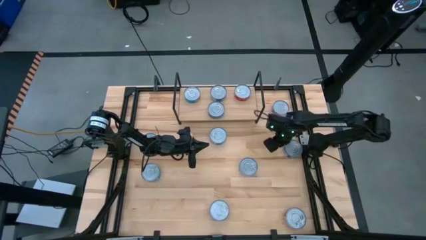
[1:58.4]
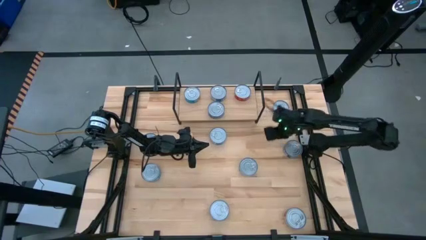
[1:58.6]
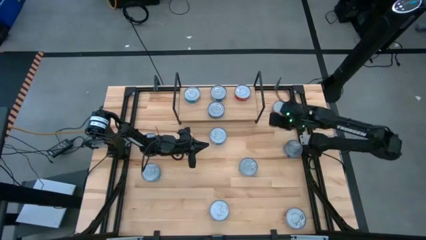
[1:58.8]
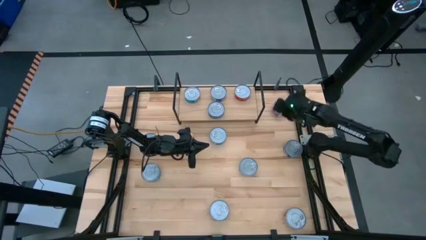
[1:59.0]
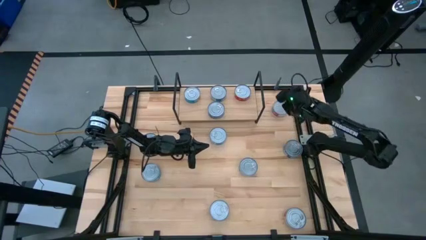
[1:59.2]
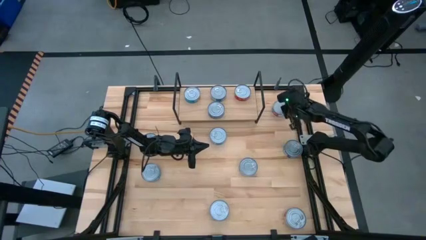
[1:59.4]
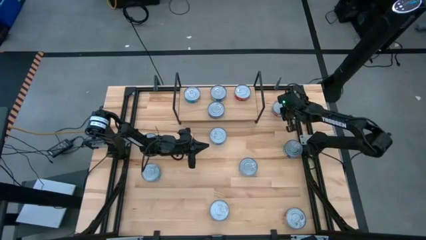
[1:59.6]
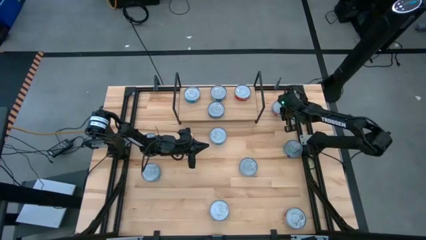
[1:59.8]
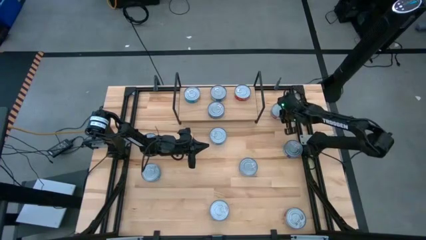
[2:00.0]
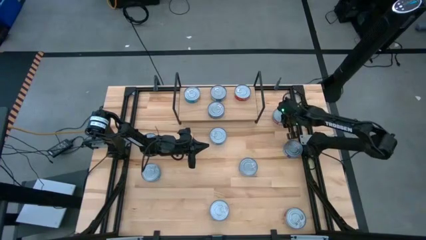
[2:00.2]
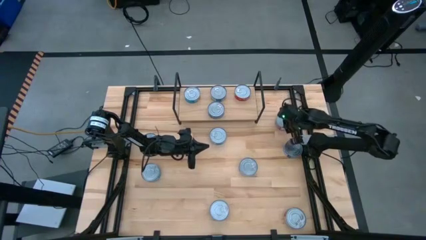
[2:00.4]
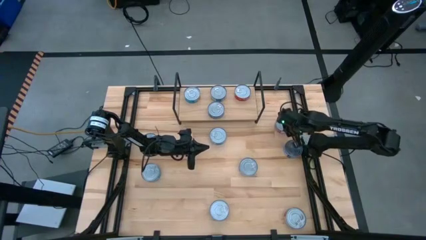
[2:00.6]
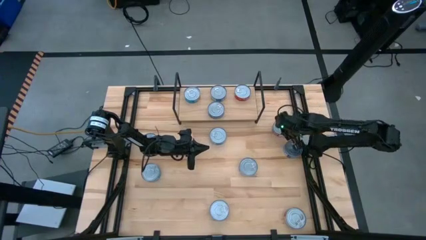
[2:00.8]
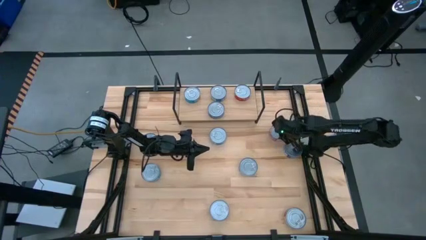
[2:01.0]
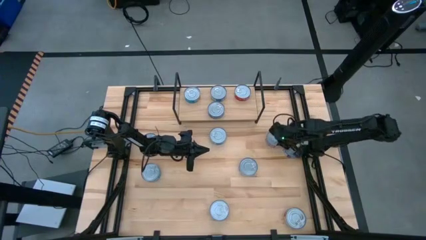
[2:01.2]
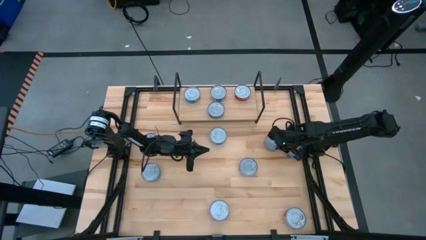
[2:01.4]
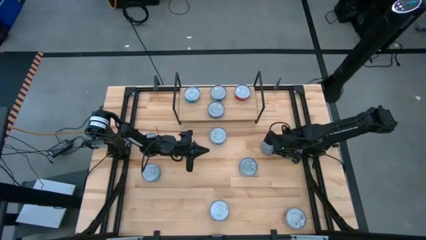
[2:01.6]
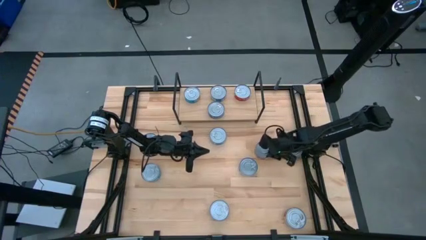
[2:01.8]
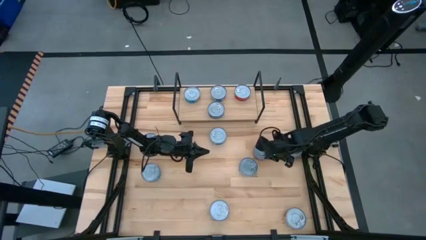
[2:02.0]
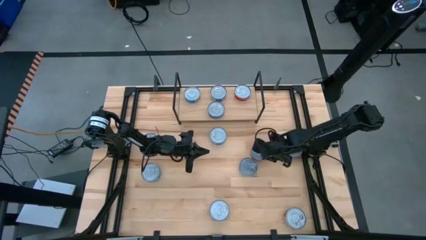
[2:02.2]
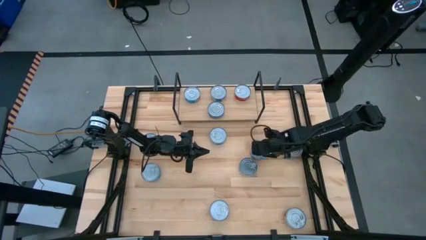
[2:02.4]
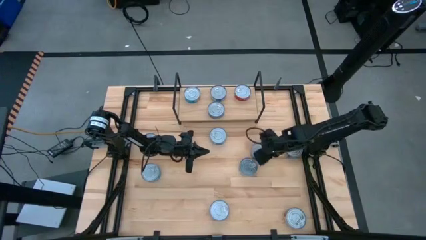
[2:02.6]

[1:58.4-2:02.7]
Task: Stack canned seafood by type on shelf
Move the top right red tuna can to the middle right of the table

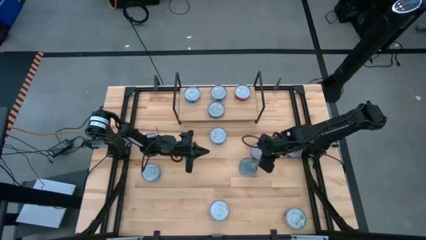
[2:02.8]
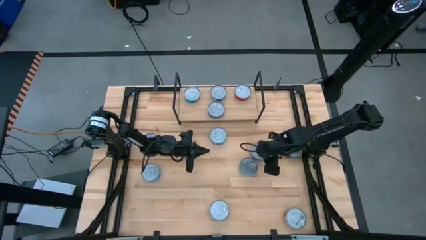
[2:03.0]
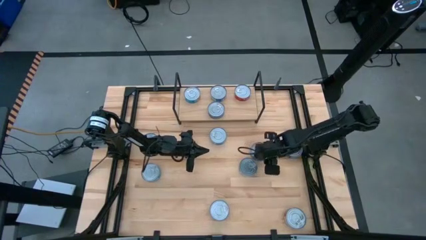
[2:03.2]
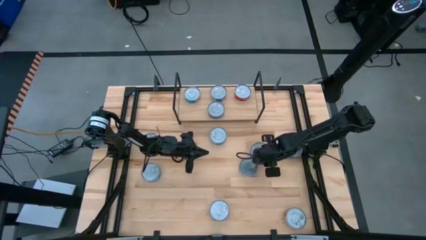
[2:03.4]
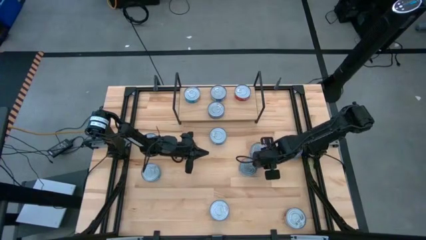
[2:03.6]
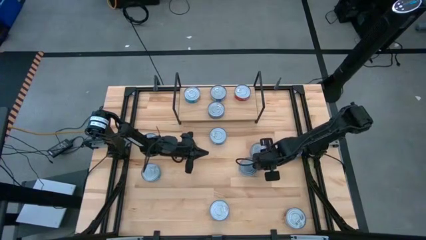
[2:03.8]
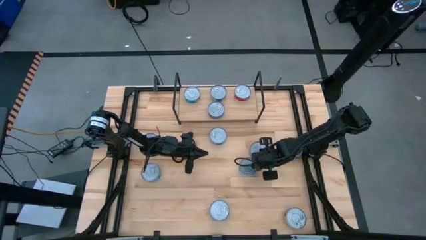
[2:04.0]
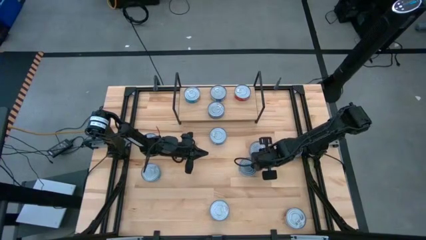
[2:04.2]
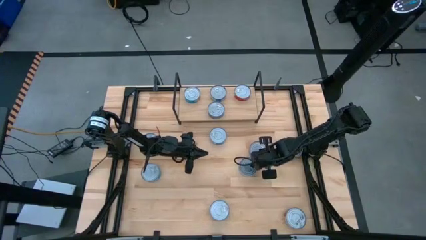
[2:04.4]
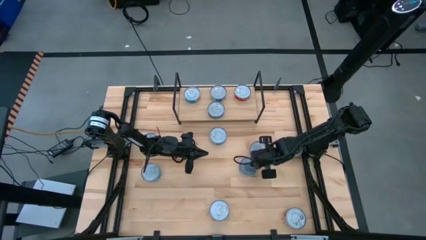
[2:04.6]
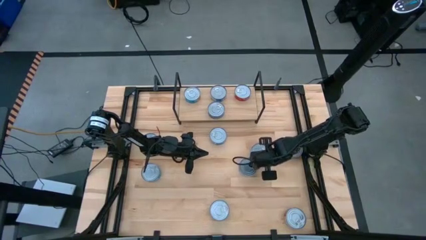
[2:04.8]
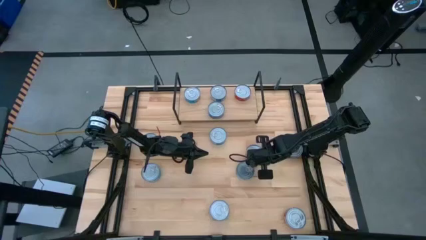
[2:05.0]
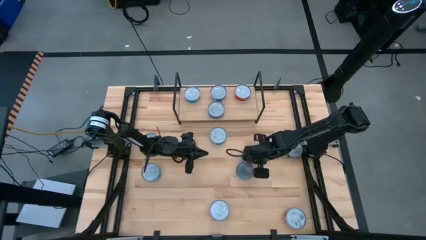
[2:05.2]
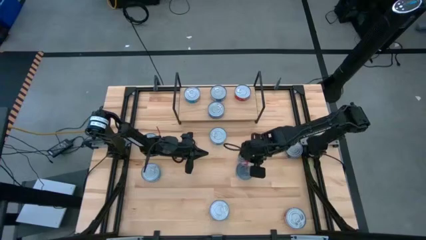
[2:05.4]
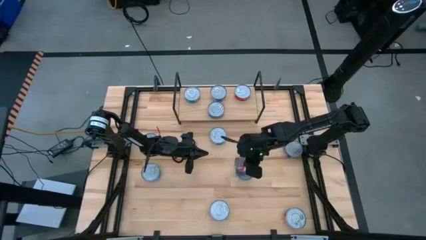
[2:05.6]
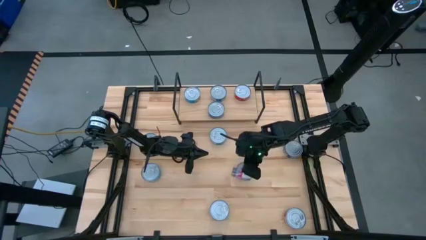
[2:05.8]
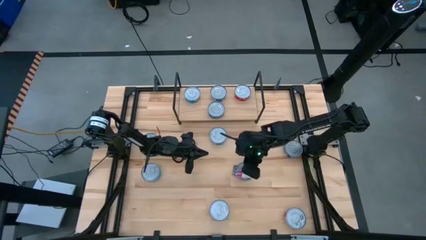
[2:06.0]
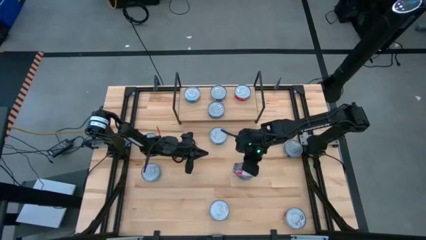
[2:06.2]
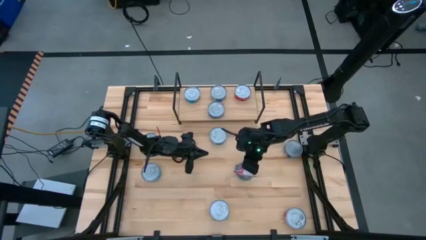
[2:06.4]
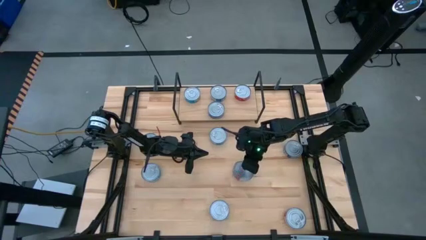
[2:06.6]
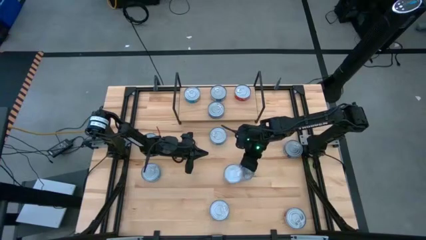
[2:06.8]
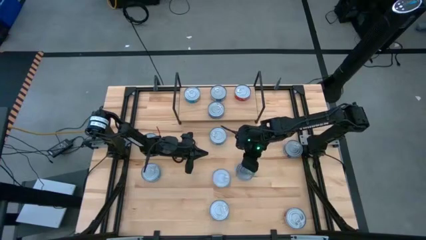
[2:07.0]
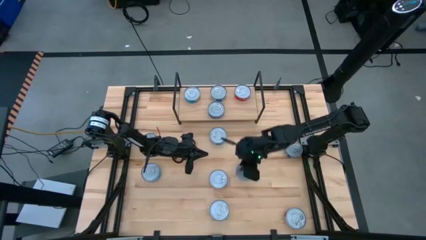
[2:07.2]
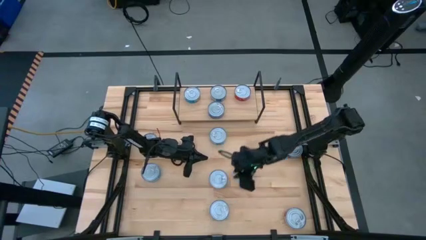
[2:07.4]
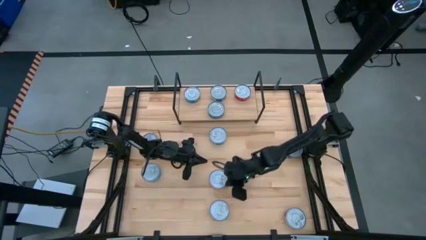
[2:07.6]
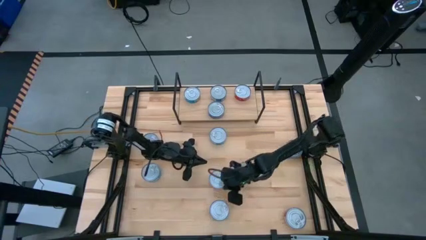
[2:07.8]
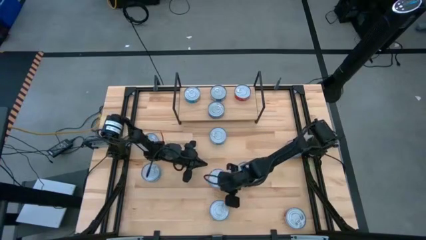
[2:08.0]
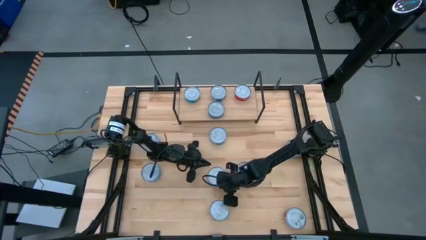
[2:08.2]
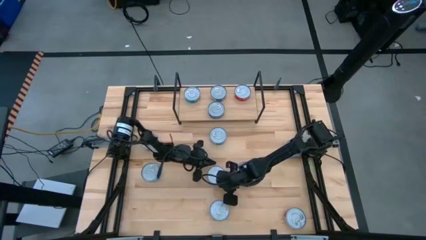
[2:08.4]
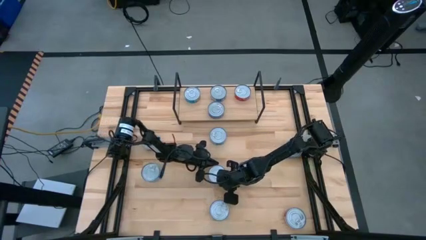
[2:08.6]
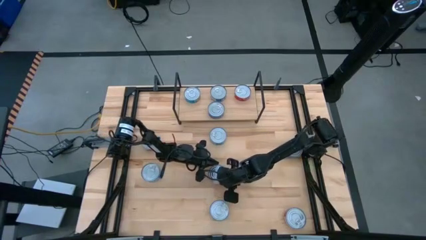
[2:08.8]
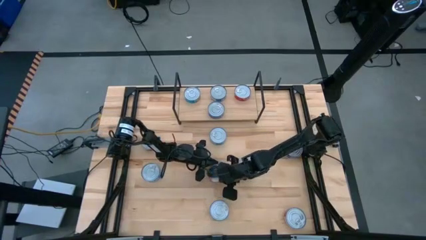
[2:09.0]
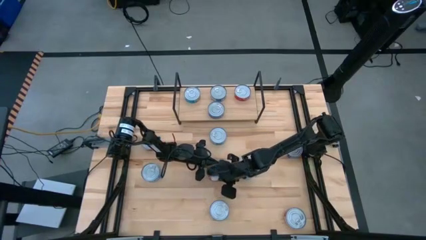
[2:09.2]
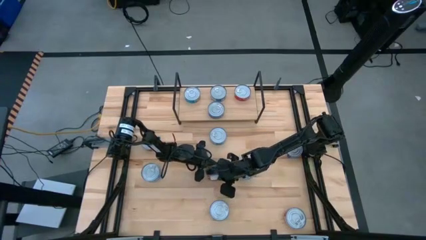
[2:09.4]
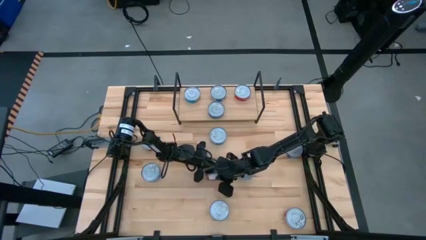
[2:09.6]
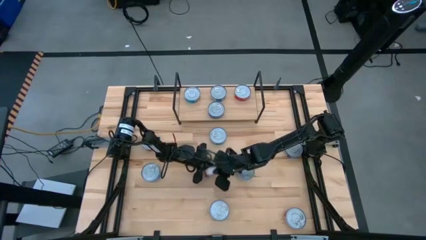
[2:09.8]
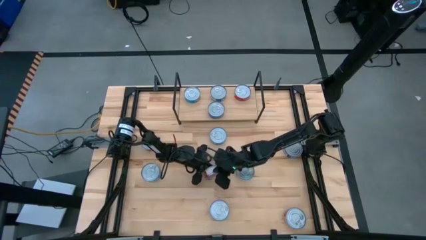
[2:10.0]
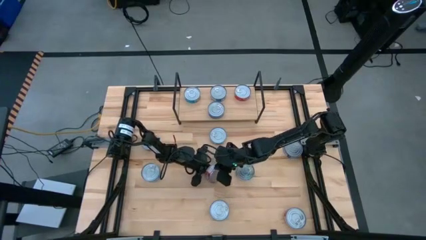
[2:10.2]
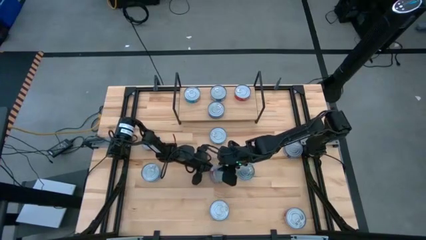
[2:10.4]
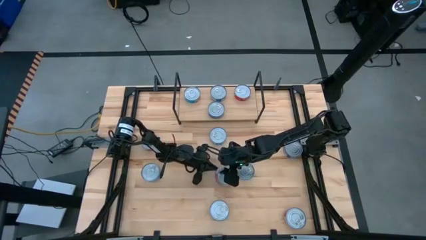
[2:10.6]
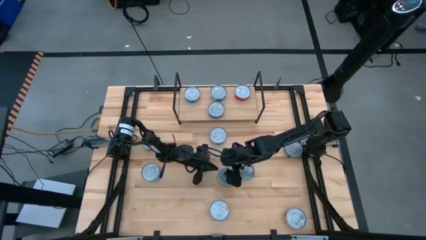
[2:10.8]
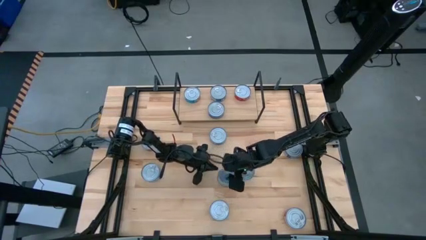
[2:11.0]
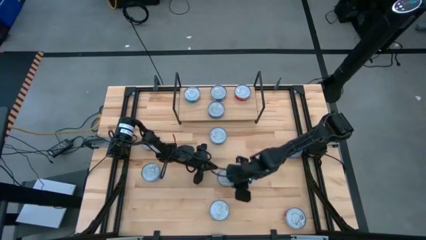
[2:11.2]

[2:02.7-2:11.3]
Put the middle right red tuna can on the shelf
